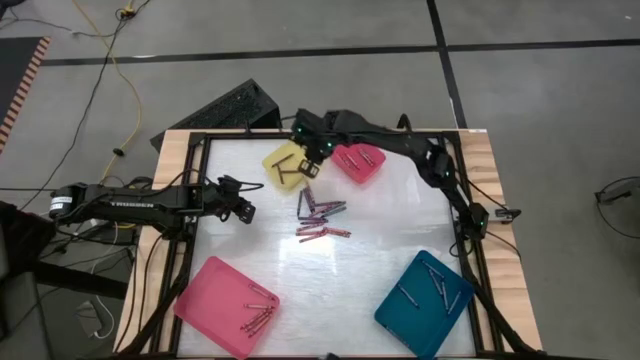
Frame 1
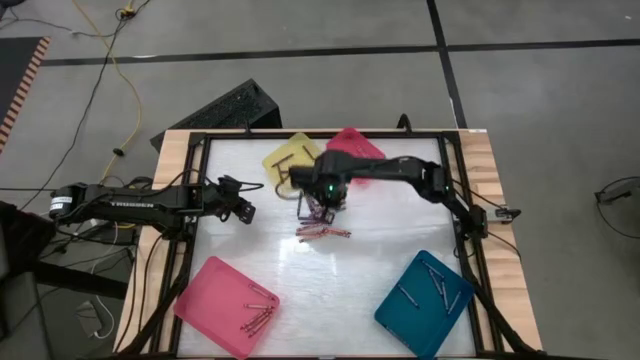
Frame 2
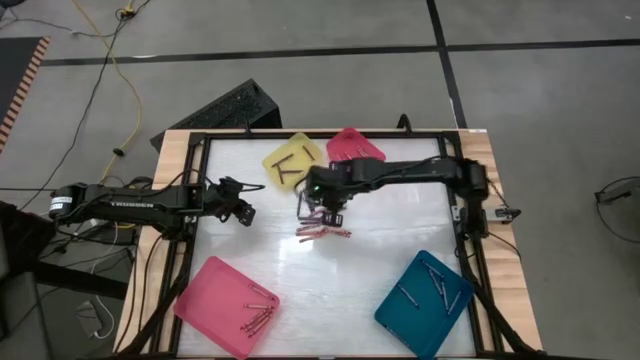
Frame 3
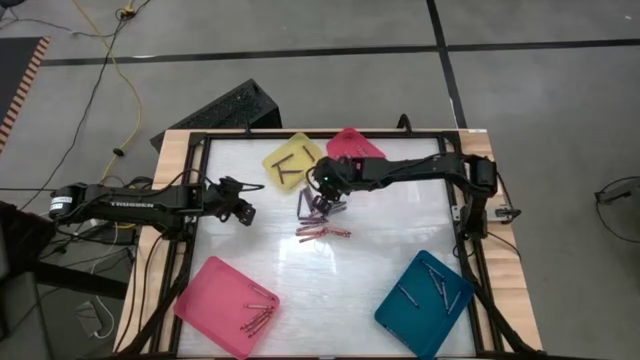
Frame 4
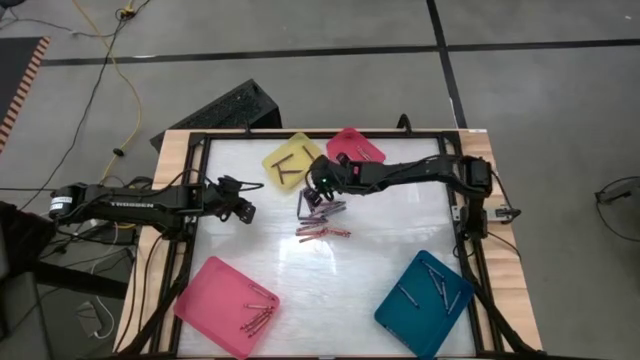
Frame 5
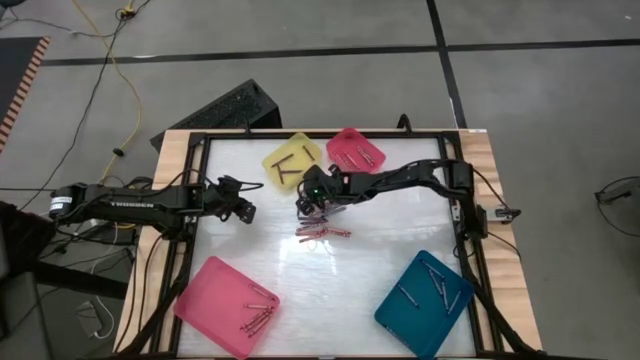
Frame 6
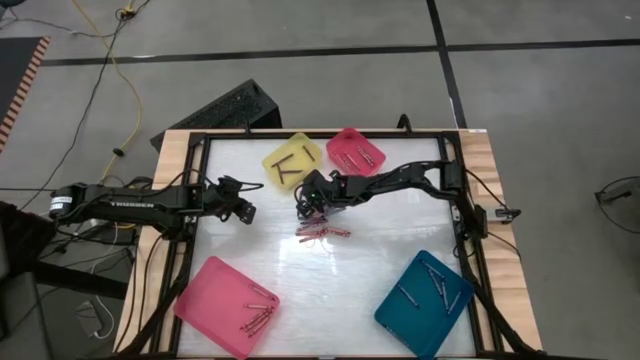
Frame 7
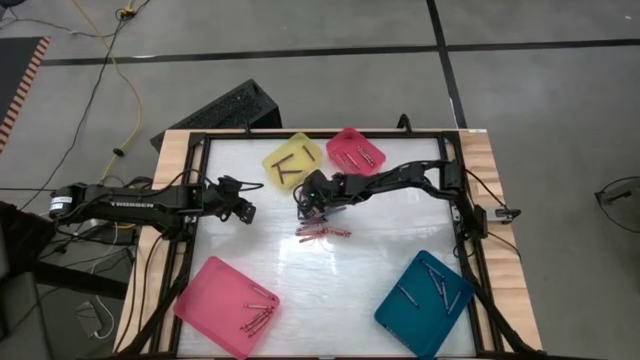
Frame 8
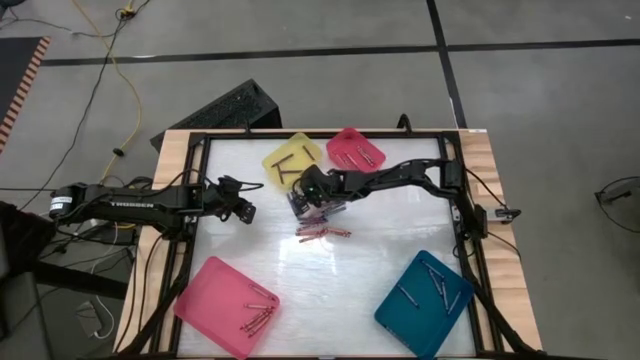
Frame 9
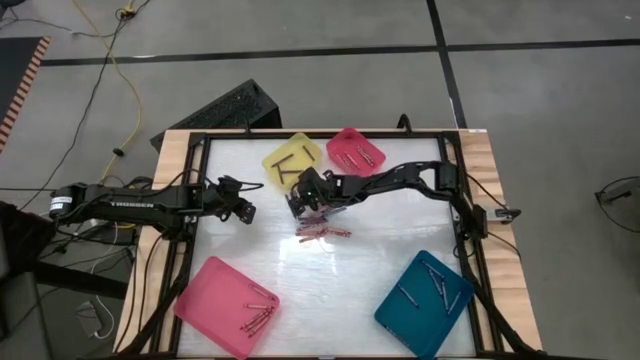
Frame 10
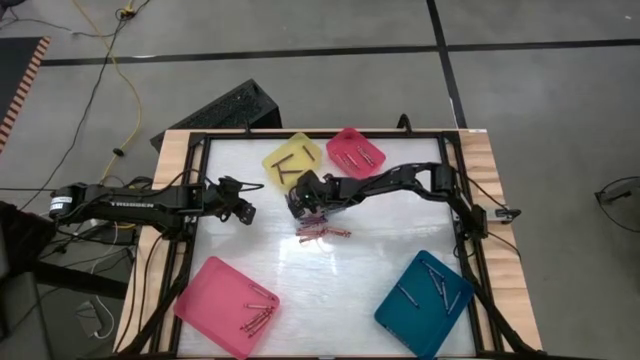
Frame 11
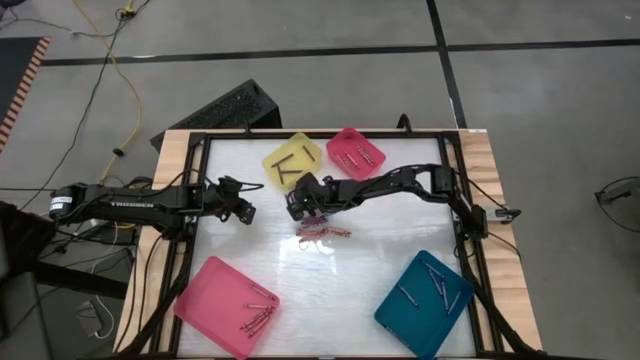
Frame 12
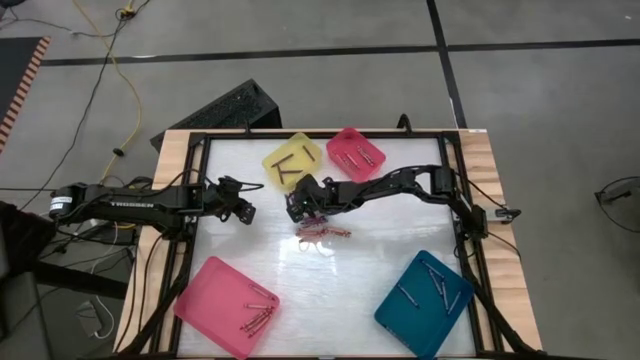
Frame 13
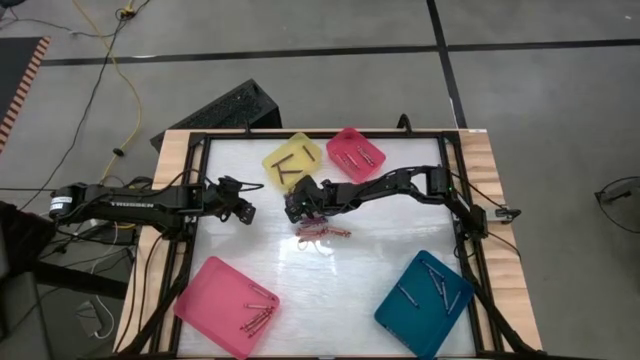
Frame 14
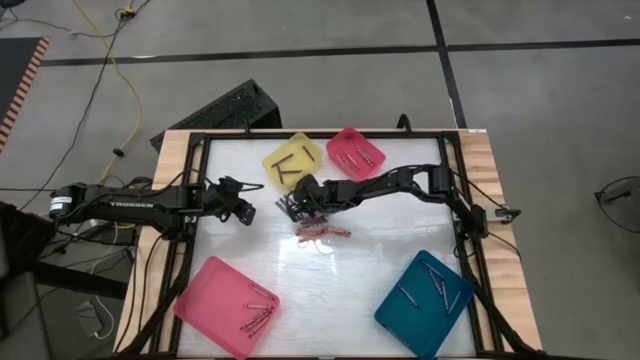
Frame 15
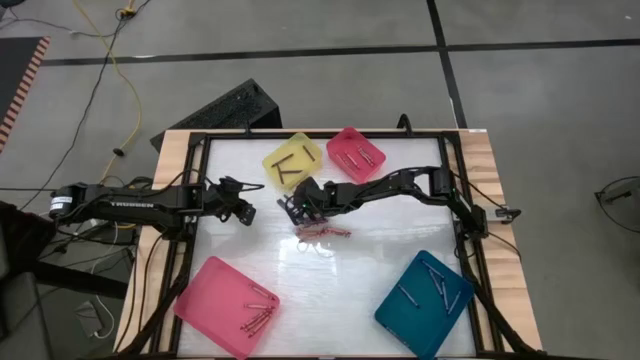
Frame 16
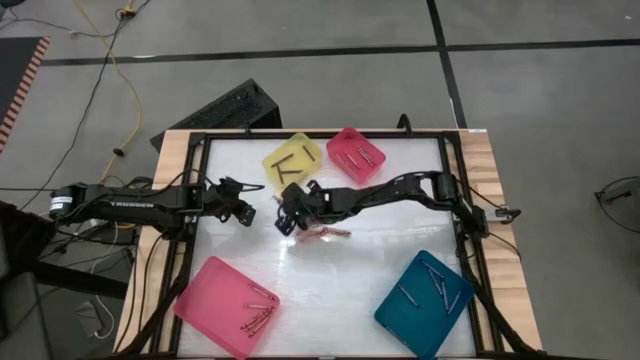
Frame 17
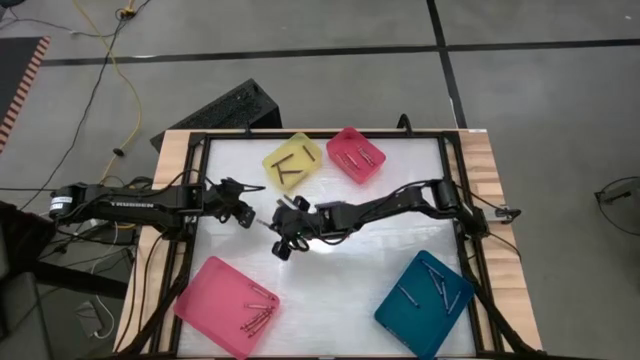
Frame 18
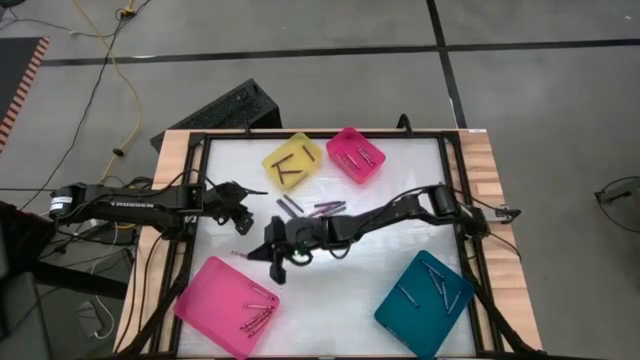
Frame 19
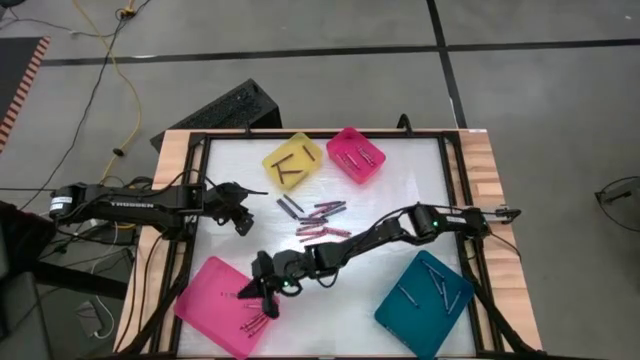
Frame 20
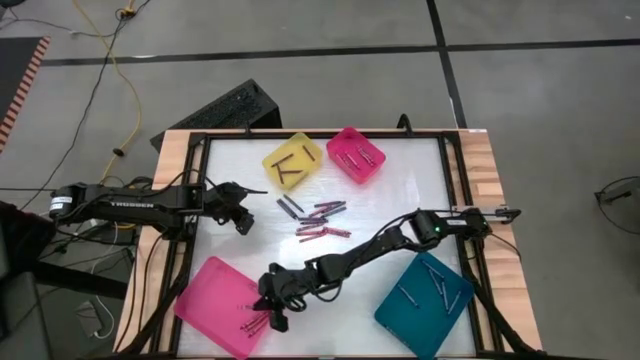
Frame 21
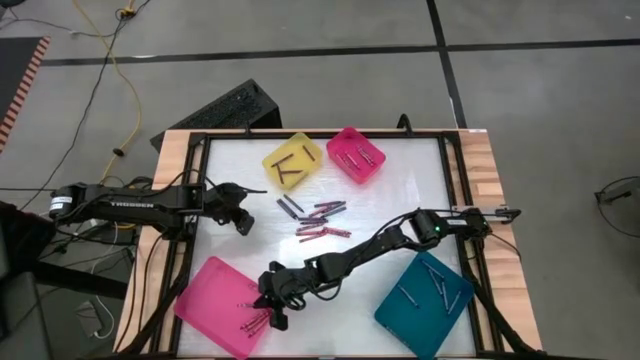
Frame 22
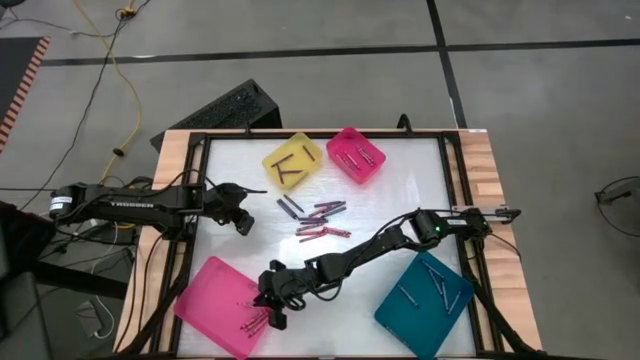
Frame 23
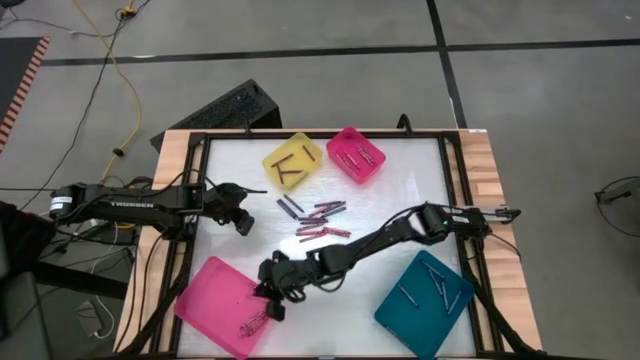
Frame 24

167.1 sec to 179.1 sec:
Task: Sort crayons
Put the red crayon into the pink bin

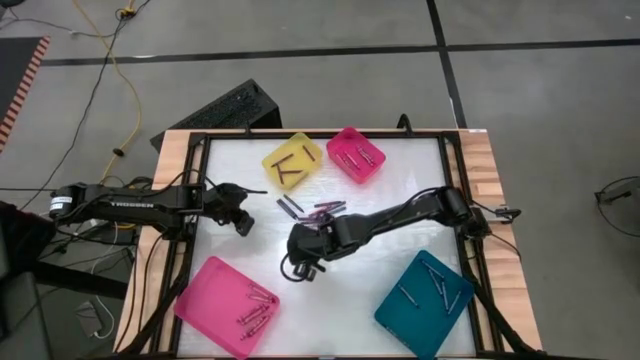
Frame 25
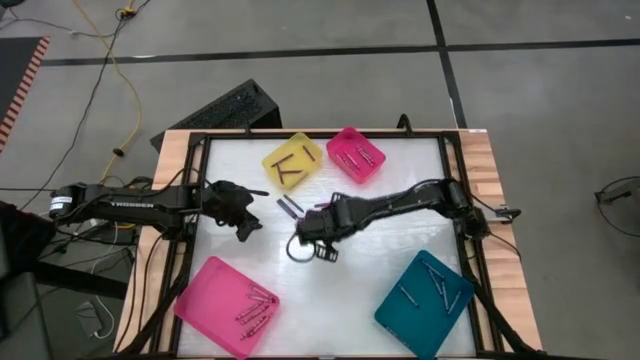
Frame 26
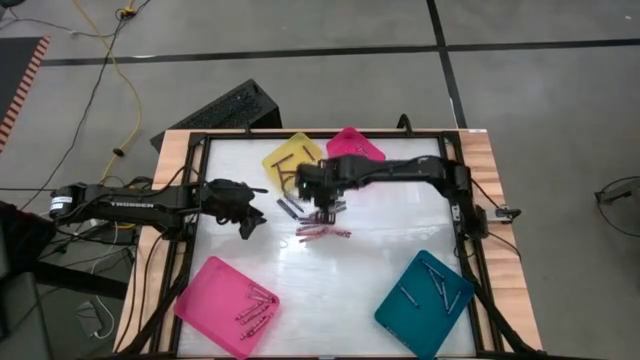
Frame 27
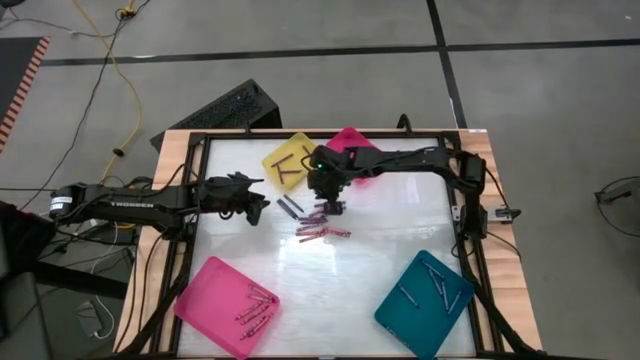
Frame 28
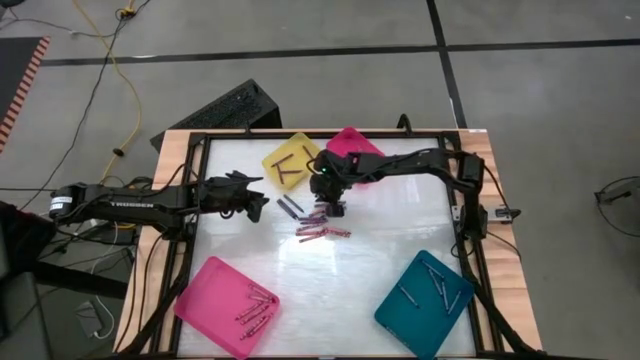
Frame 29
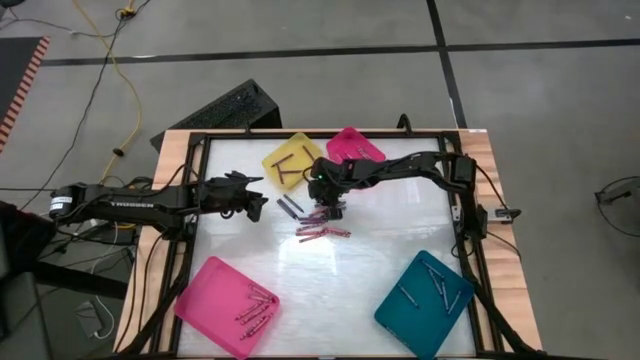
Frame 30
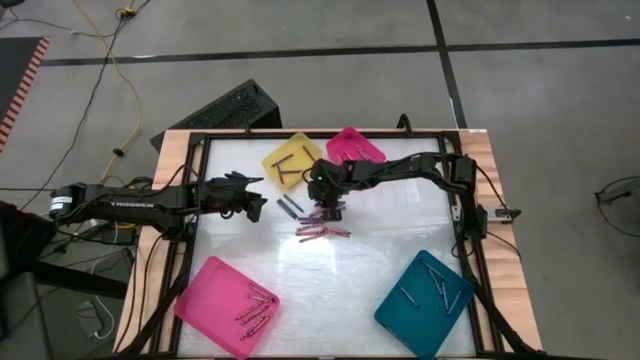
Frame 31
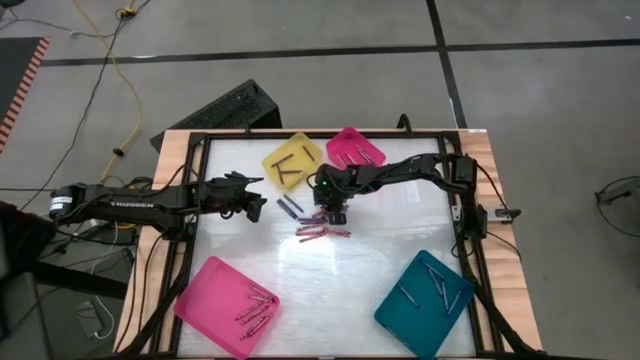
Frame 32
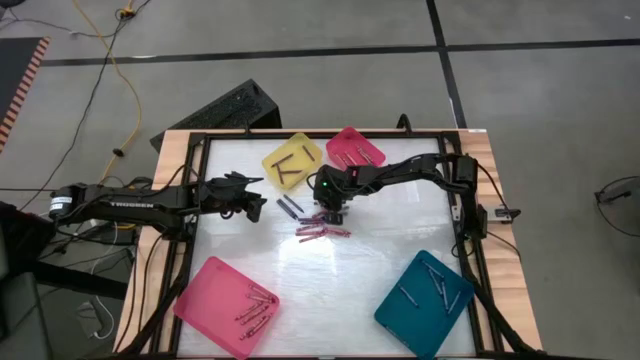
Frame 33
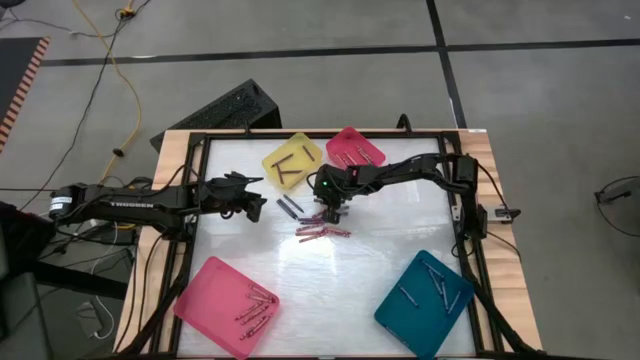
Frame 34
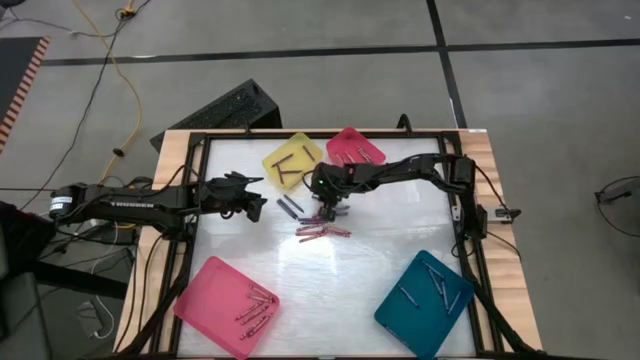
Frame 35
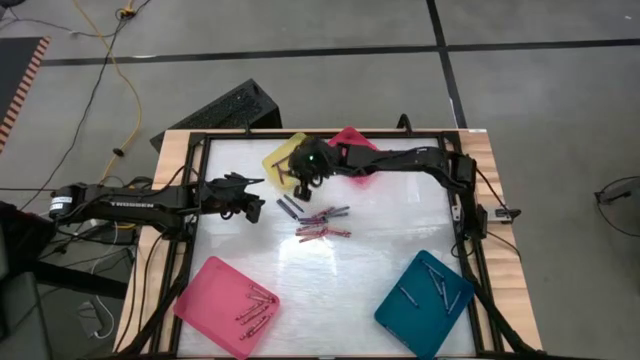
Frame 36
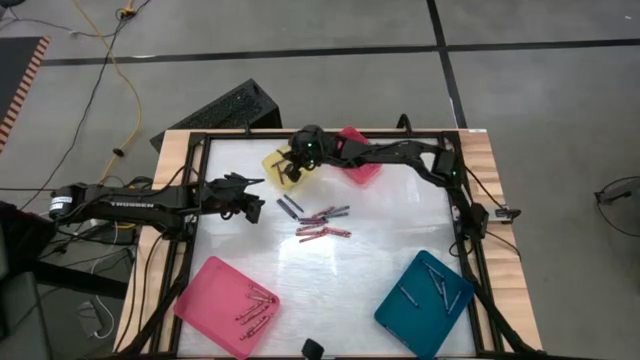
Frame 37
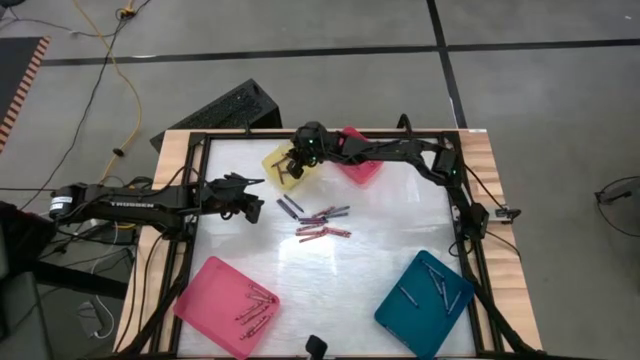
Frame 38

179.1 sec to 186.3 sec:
Put the purple crayon into the yellow bin

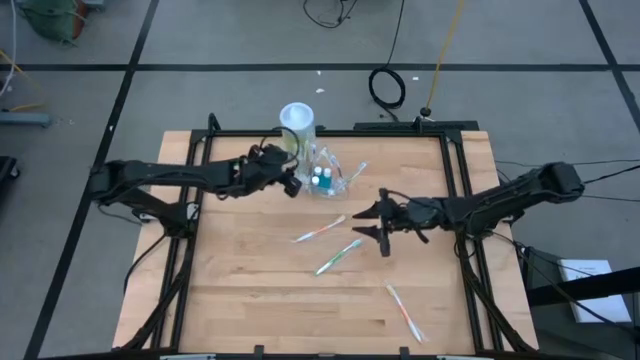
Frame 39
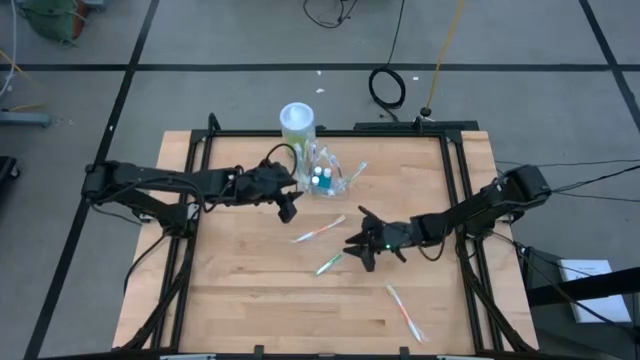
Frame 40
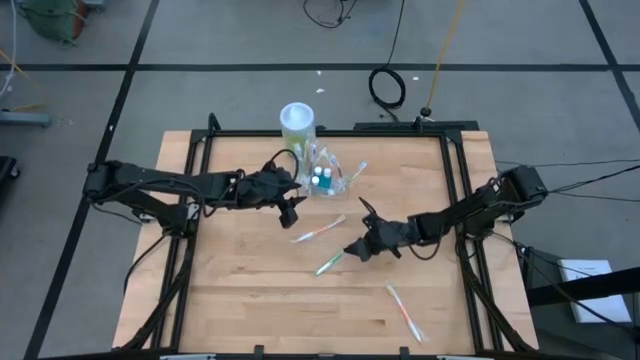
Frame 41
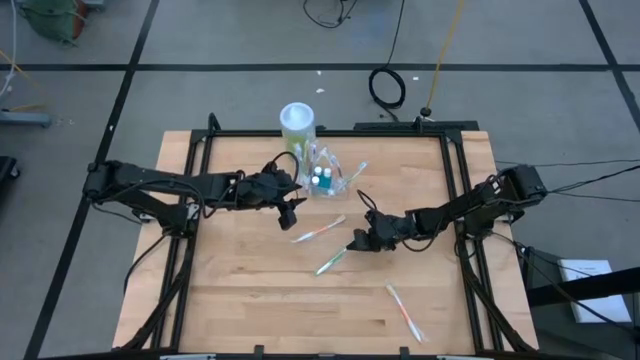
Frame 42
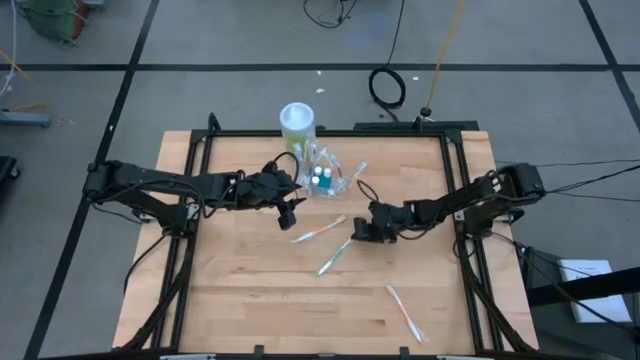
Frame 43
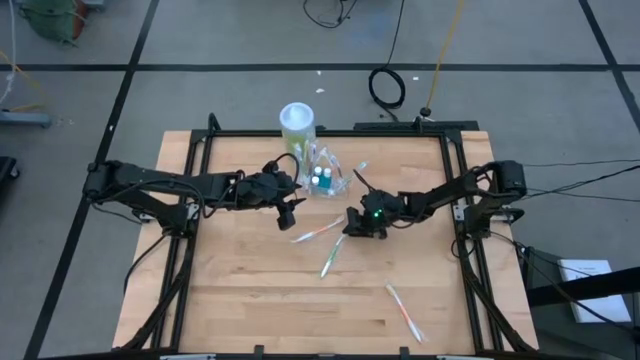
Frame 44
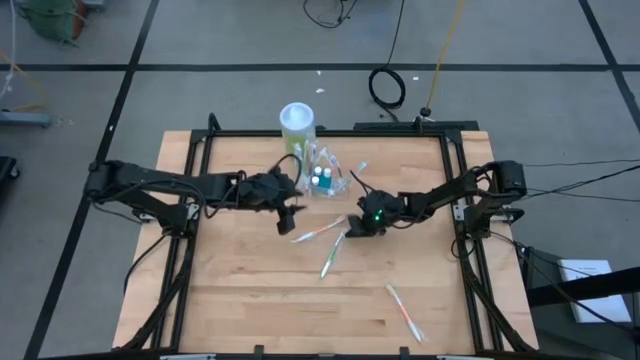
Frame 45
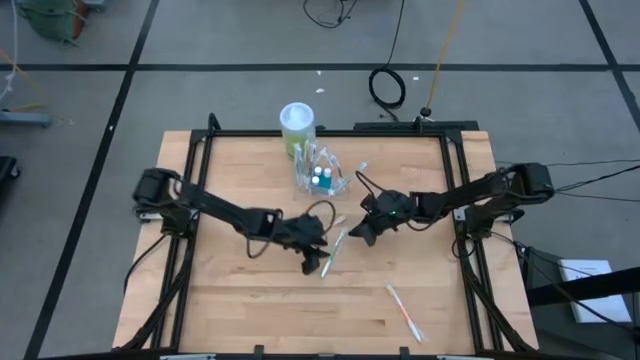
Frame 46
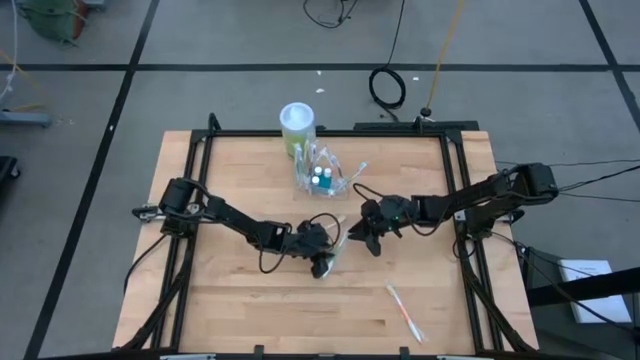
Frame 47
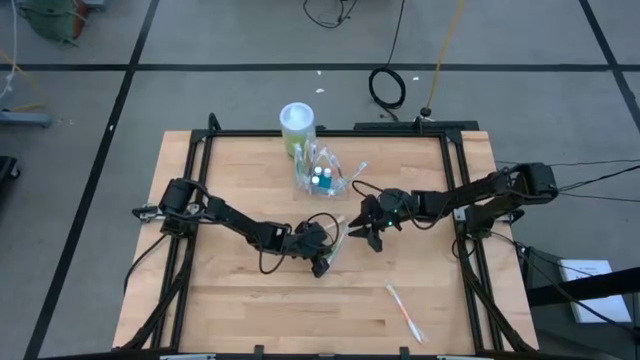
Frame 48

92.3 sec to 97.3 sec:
Task: Pick & Place toothbrushing station
Put the green toothbrush into the right of the transparent organizer
